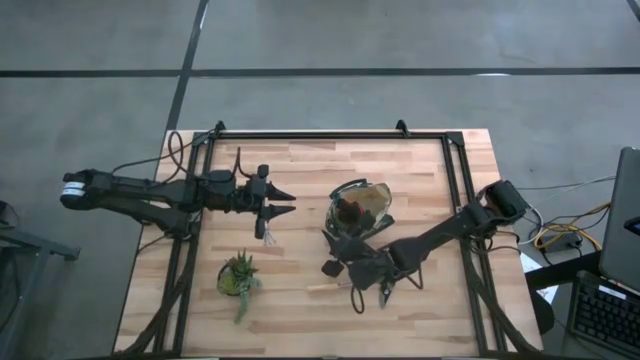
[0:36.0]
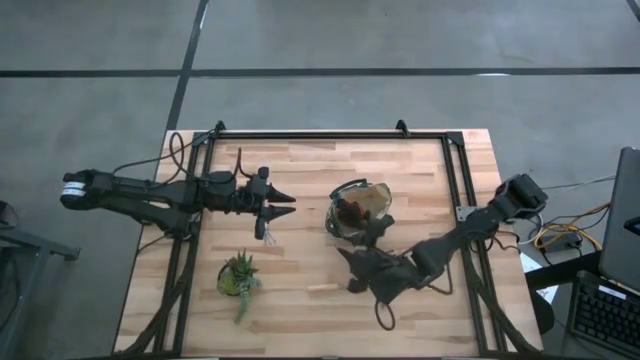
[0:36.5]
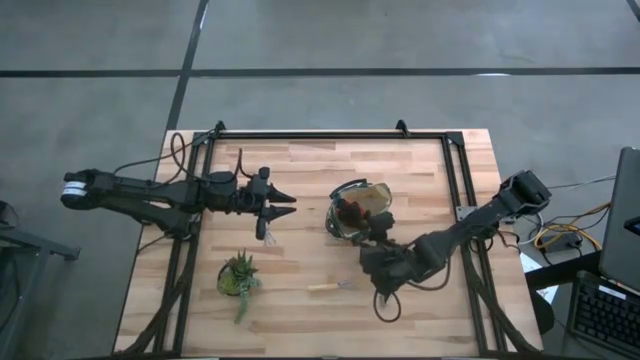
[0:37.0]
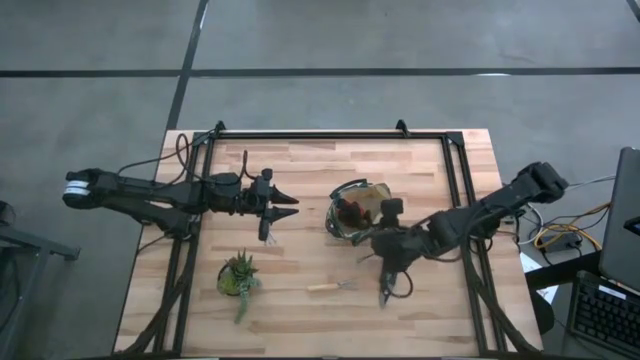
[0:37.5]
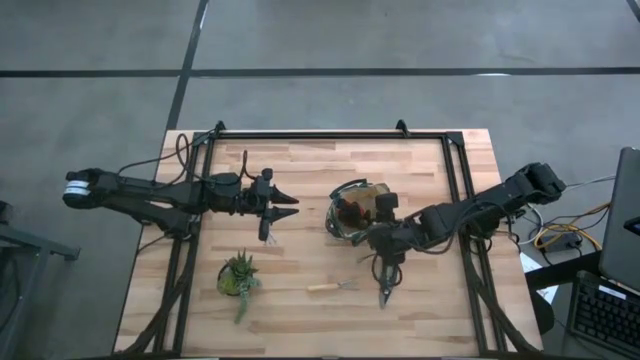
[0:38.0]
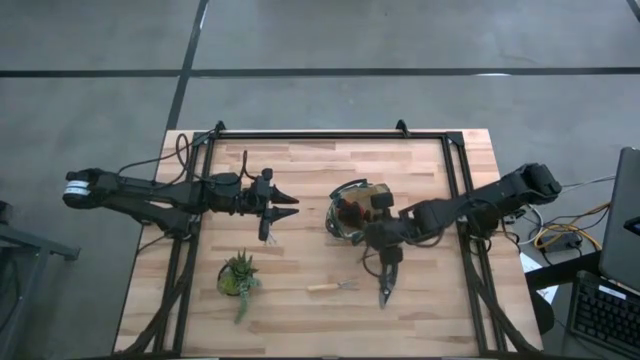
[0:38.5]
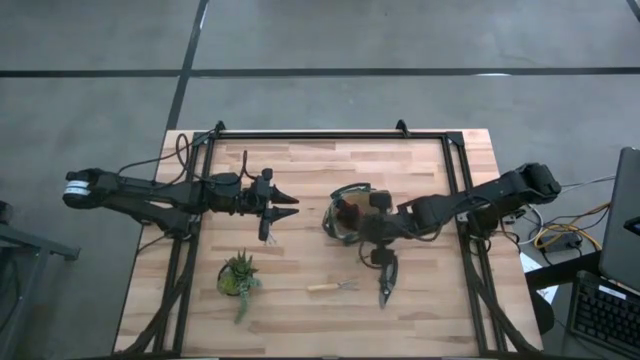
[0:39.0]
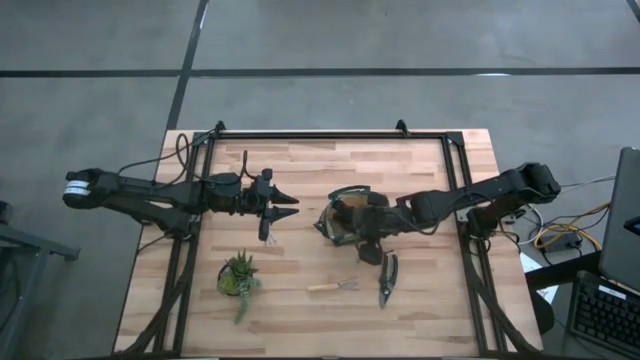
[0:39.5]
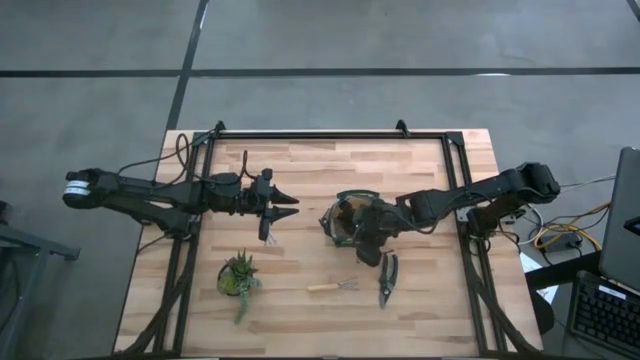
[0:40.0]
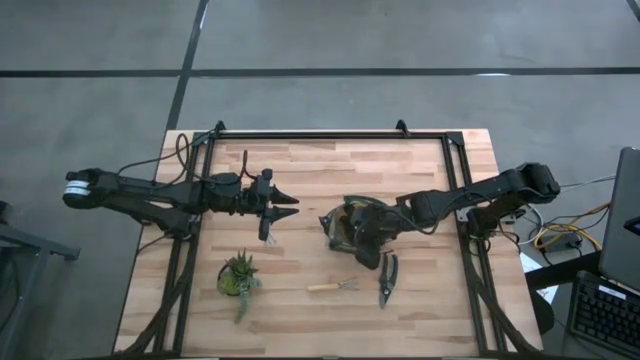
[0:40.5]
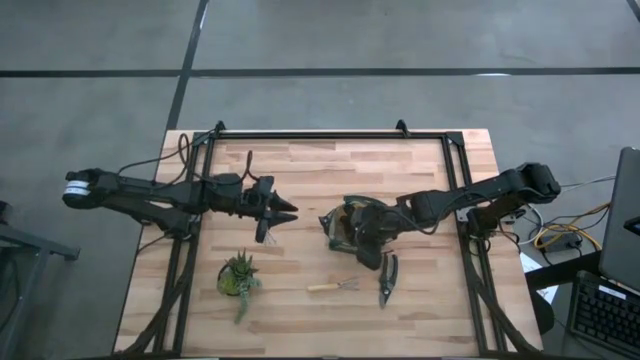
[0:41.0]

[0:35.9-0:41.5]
Task: Pick & Place Garden tools in Gardening bag
Adjust the green gardening bag on the table

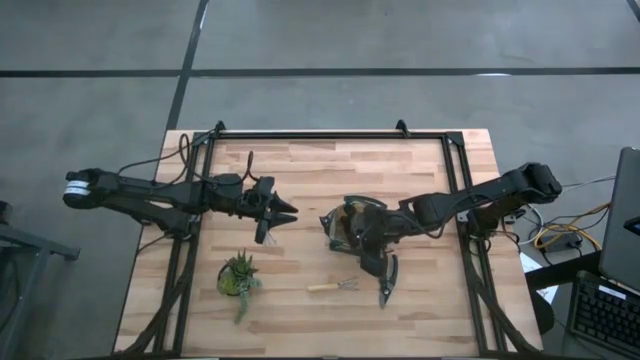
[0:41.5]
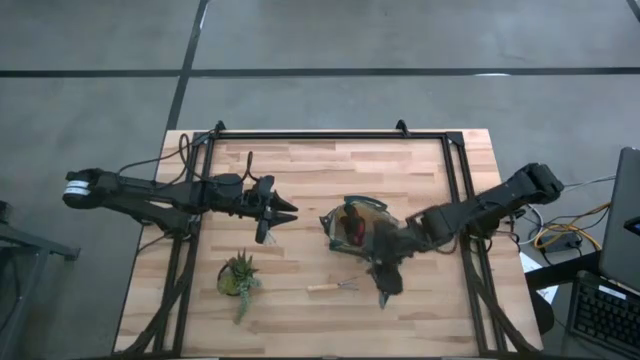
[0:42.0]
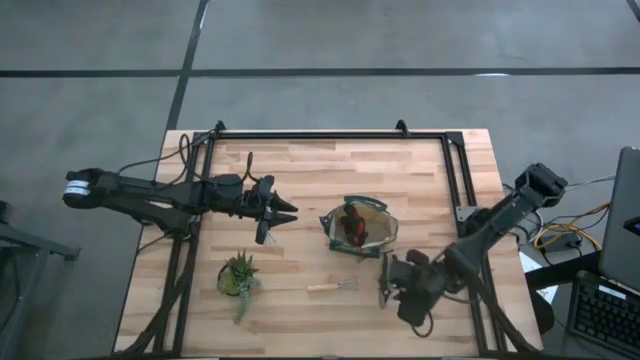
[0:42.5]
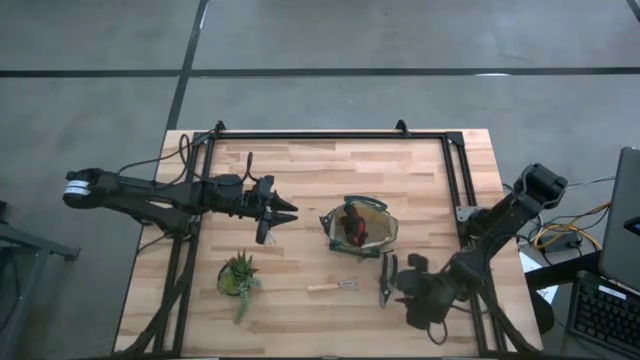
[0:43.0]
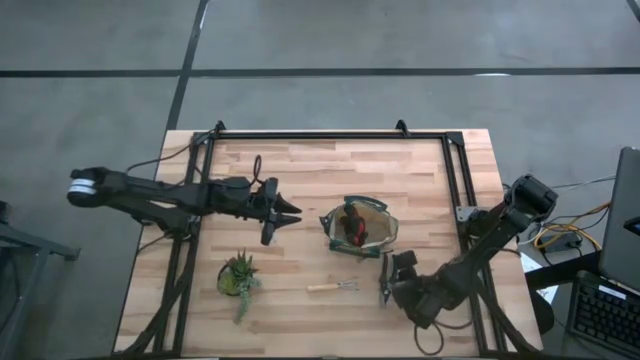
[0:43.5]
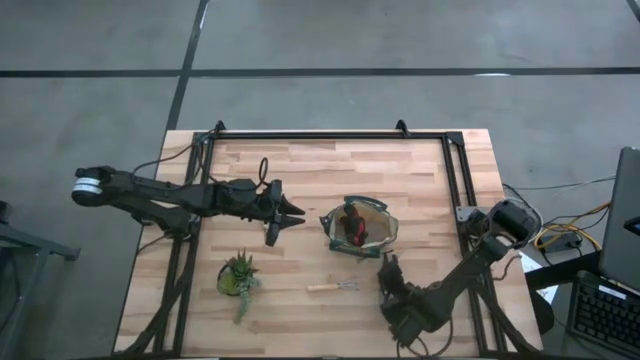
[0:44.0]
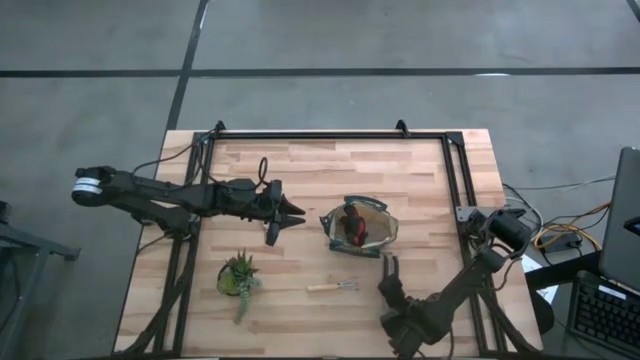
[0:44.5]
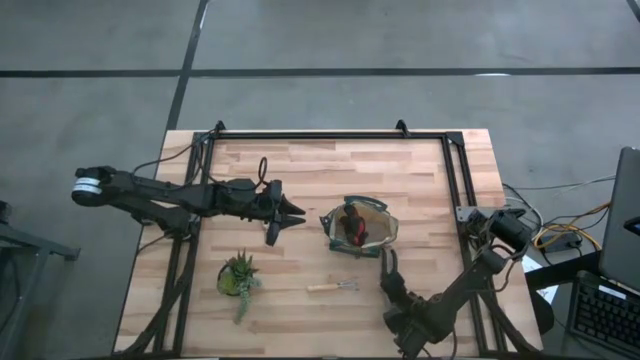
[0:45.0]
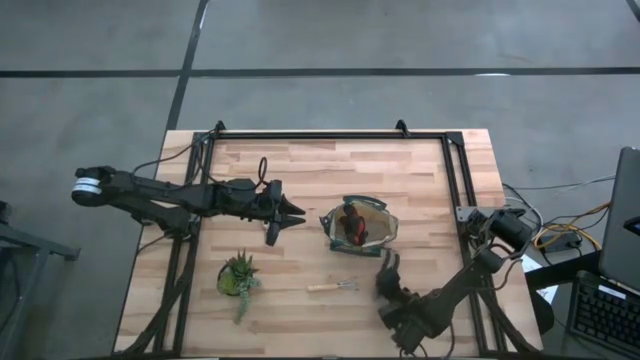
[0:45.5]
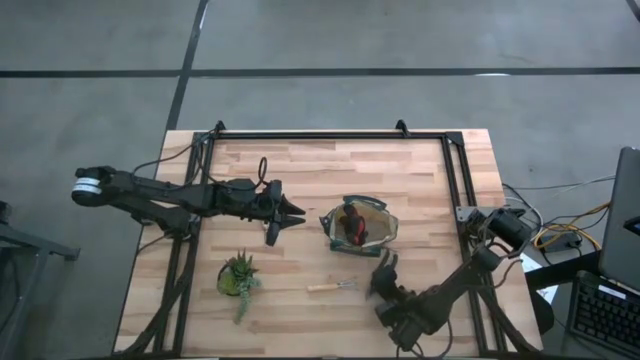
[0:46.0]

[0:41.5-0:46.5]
Put the green shear scissors into the green gardening bag

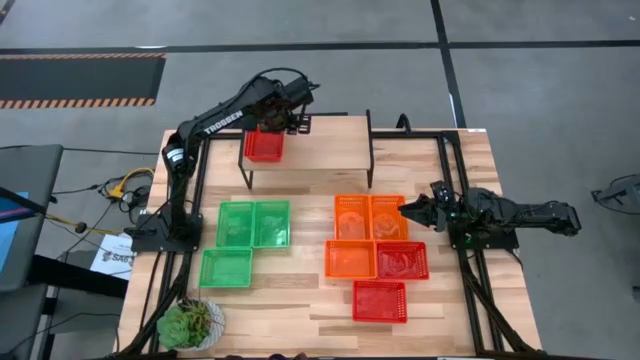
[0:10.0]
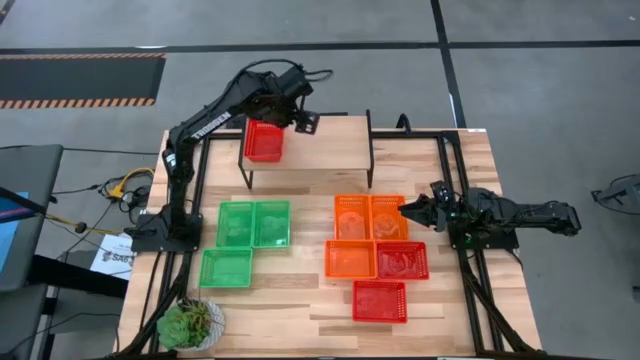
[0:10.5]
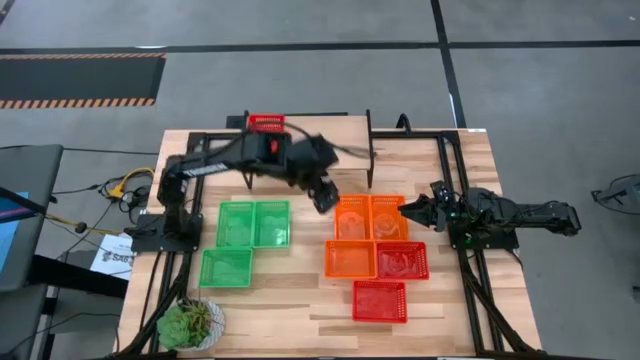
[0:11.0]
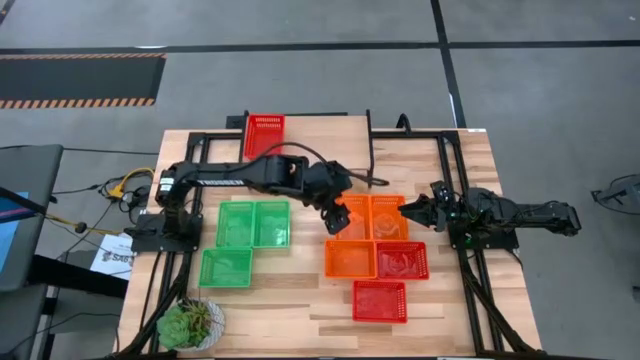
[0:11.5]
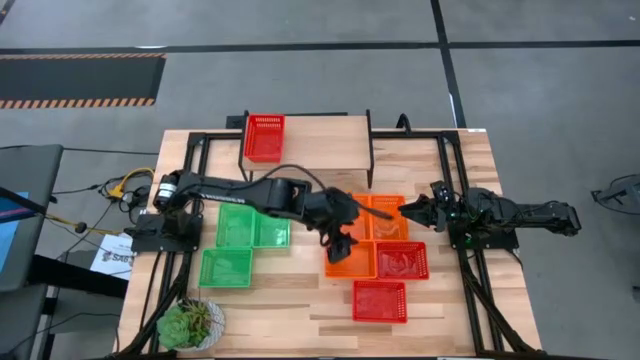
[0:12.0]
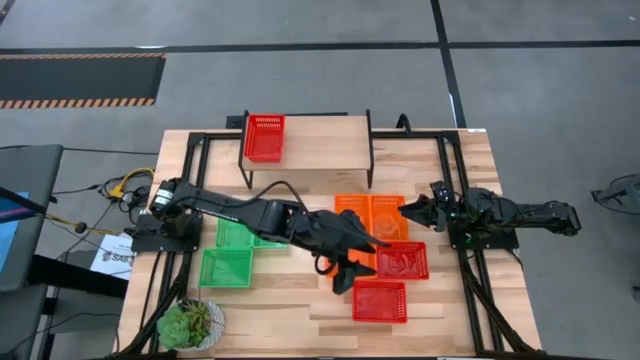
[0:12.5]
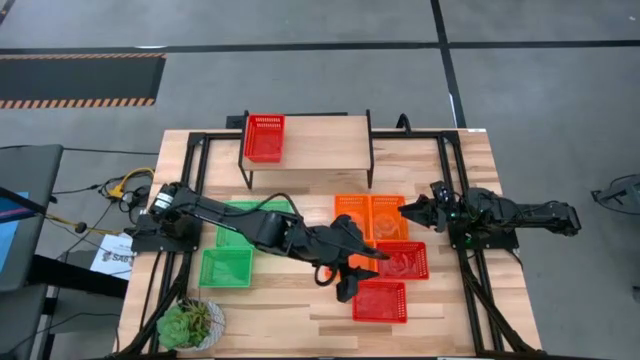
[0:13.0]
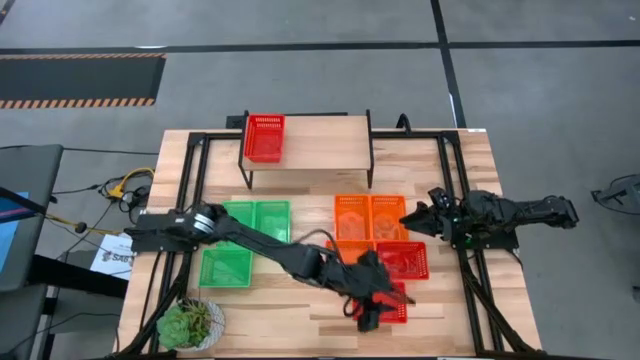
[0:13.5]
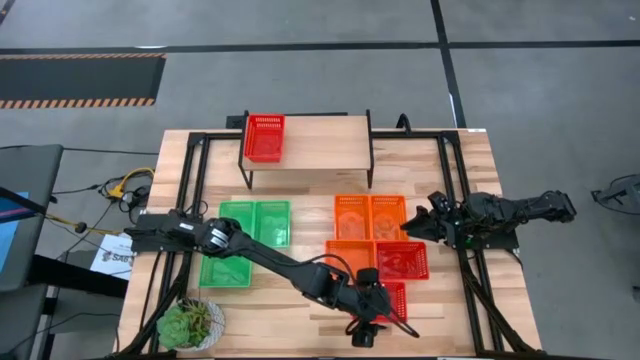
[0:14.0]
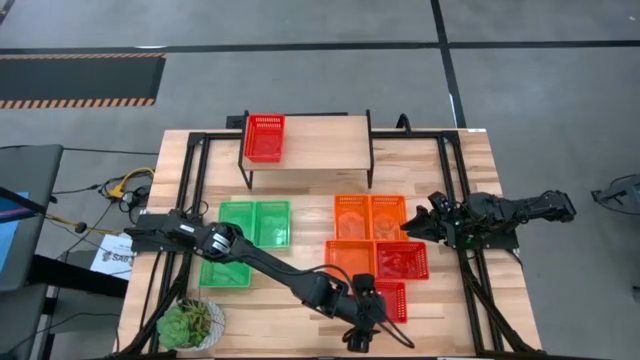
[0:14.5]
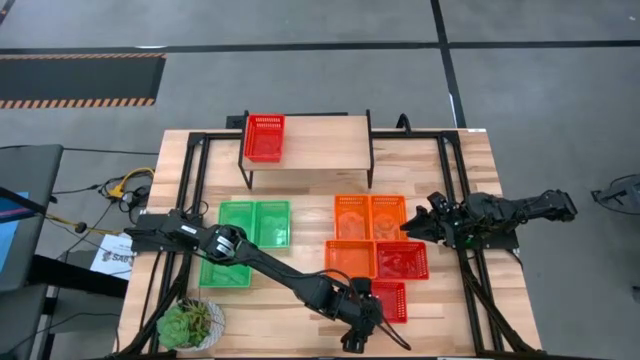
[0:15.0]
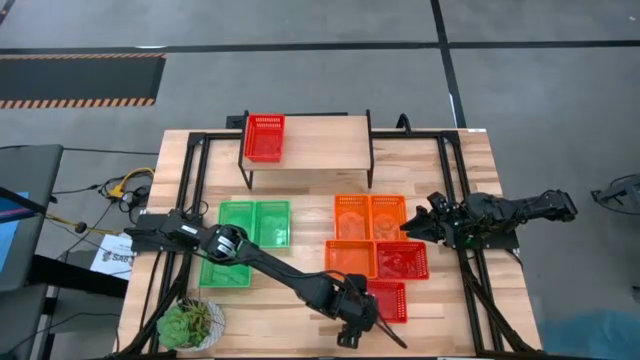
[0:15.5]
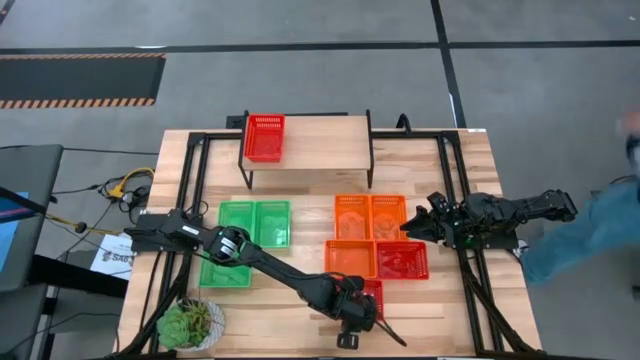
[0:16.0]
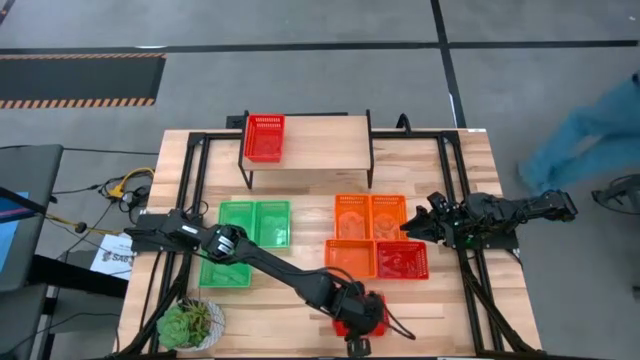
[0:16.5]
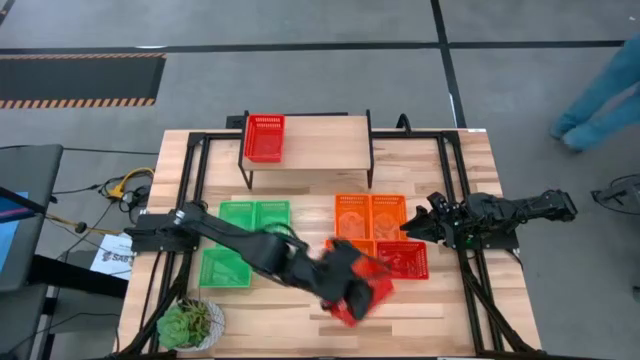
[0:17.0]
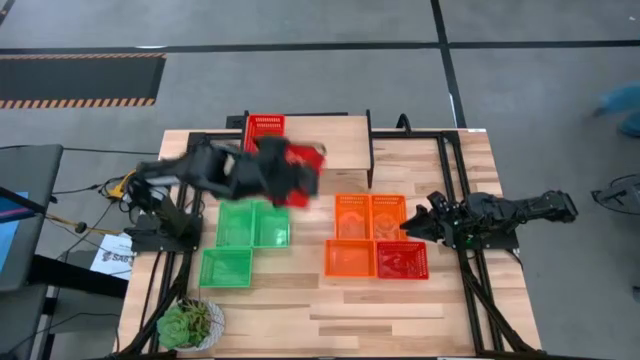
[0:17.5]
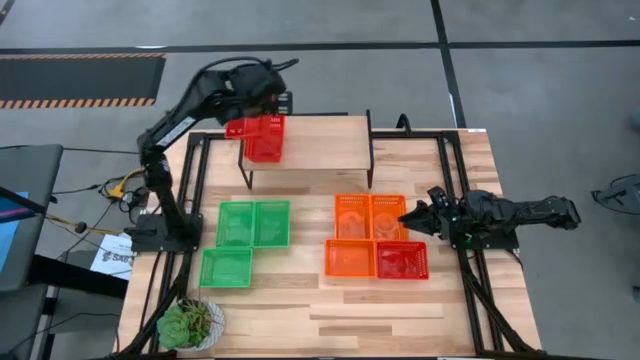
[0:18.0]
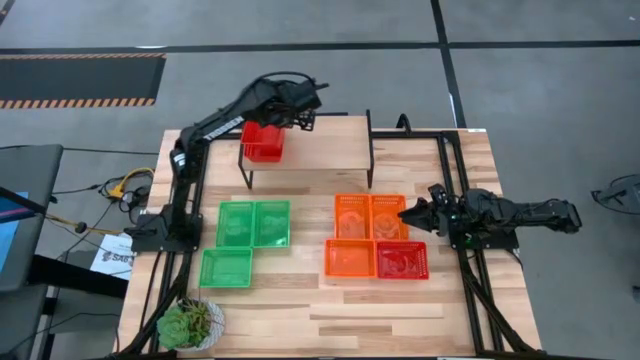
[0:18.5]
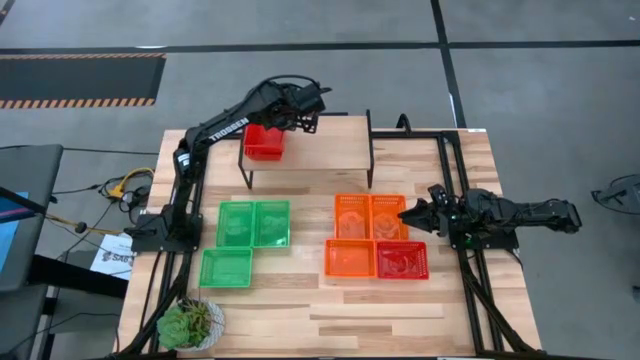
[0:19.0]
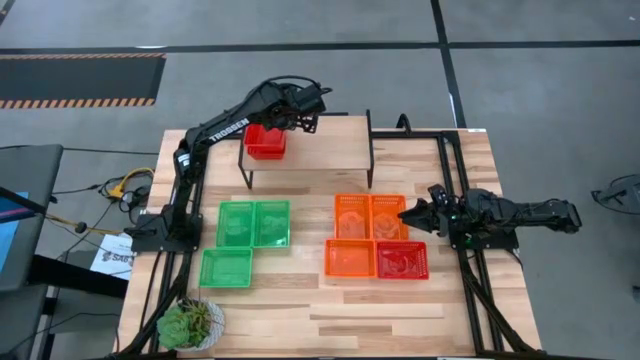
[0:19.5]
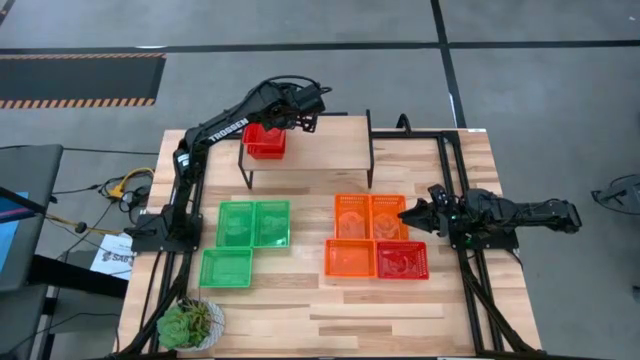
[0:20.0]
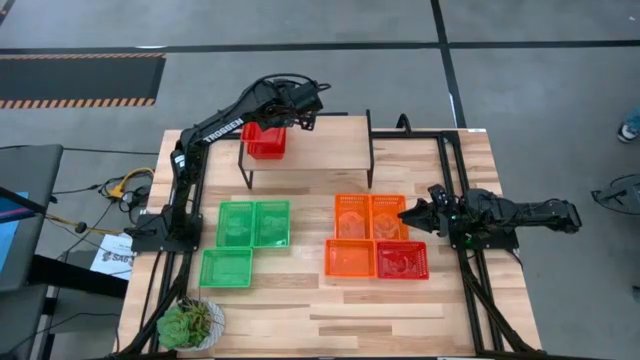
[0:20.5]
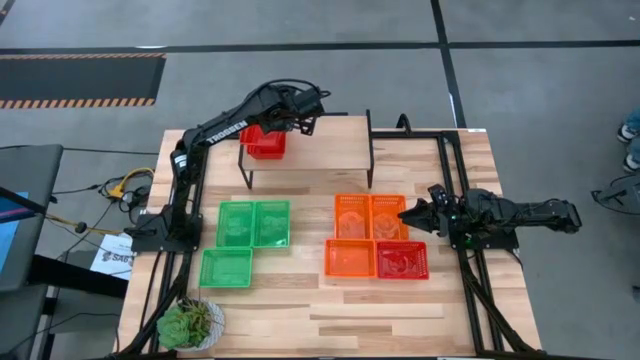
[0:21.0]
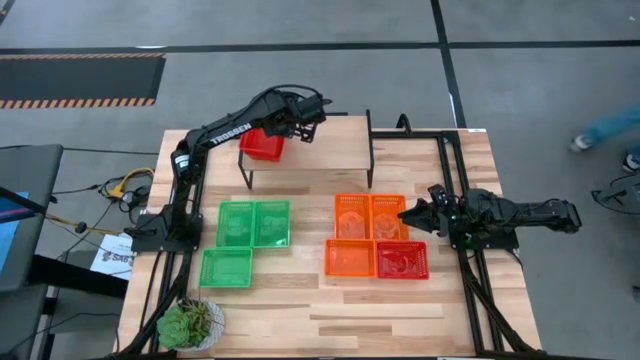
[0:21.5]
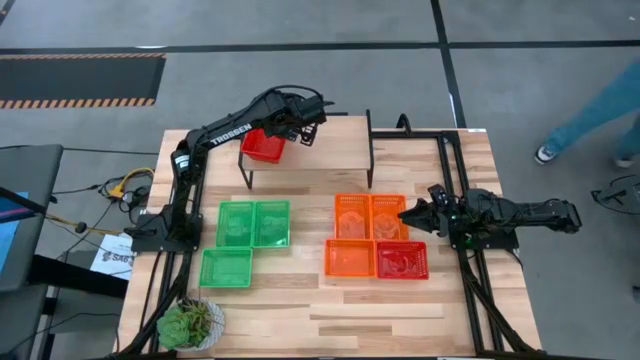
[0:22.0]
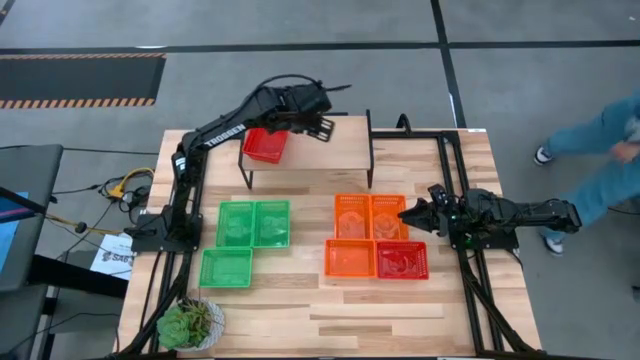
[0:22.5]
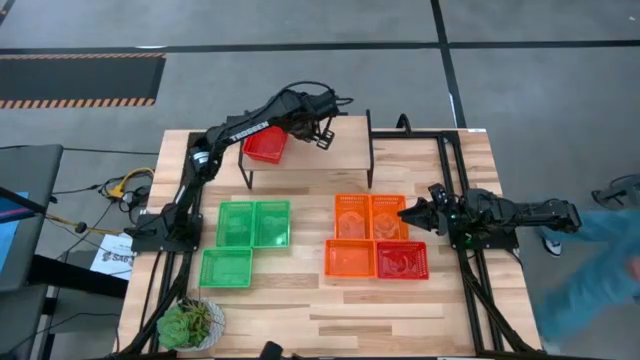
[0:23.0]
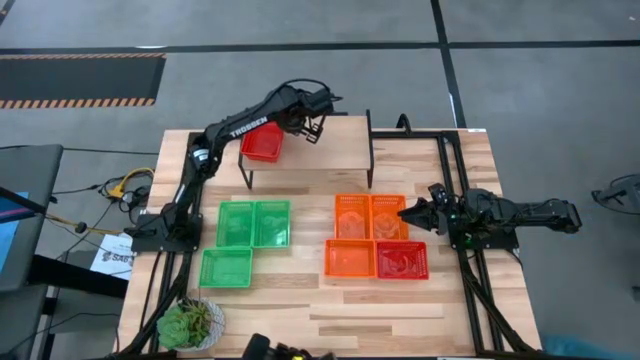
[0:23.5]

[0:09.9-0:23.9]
Task: Stack baskets on shelf by color
Stack the bottom red bin on top of the red bin on the shelf
